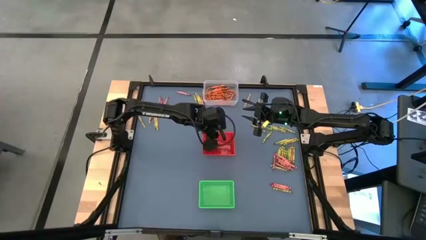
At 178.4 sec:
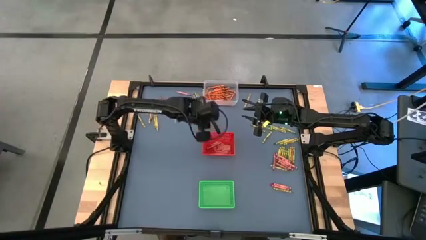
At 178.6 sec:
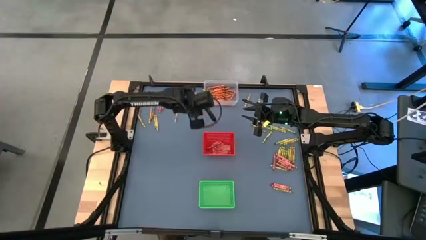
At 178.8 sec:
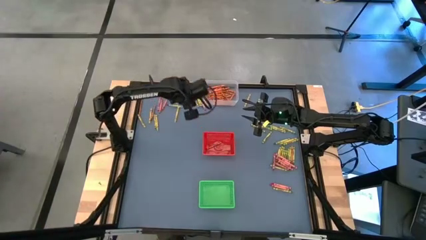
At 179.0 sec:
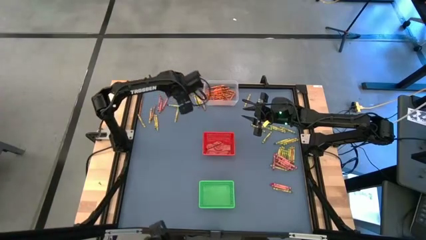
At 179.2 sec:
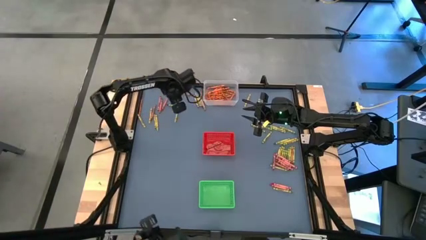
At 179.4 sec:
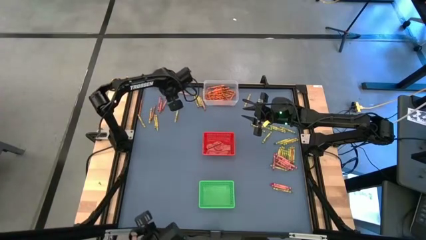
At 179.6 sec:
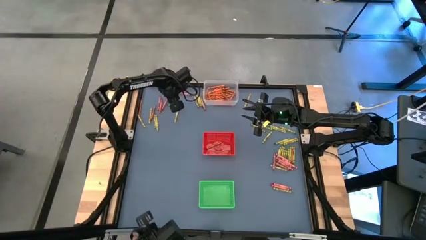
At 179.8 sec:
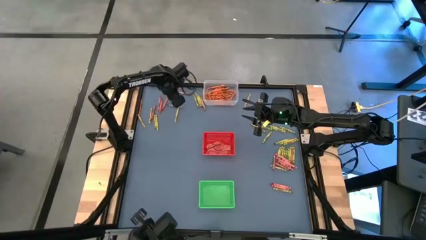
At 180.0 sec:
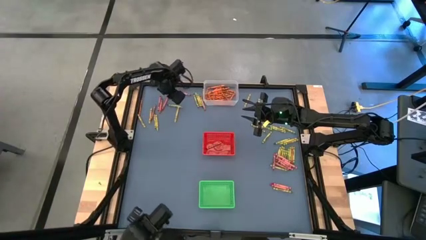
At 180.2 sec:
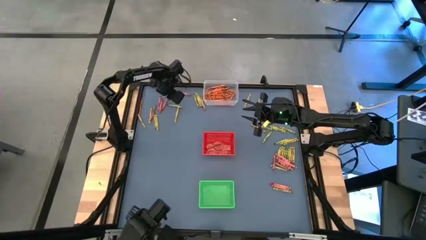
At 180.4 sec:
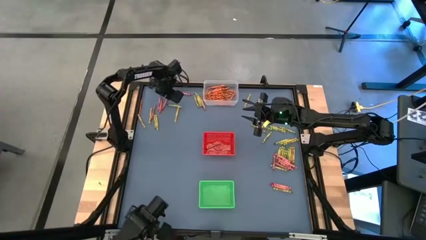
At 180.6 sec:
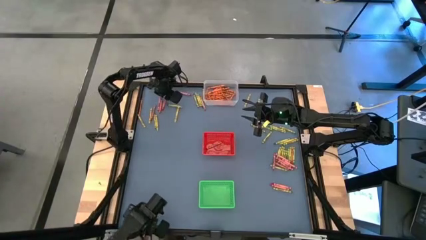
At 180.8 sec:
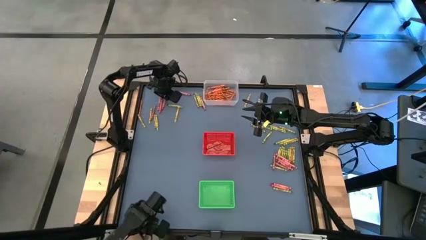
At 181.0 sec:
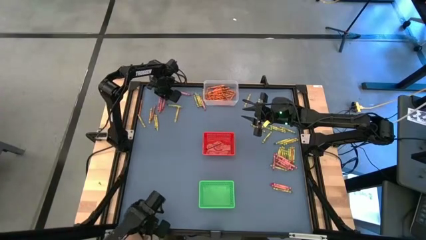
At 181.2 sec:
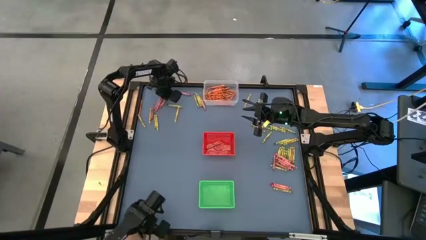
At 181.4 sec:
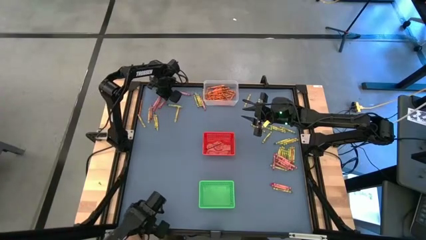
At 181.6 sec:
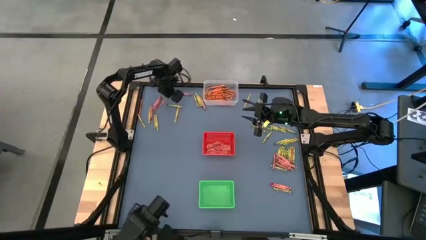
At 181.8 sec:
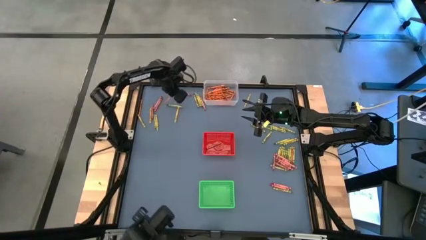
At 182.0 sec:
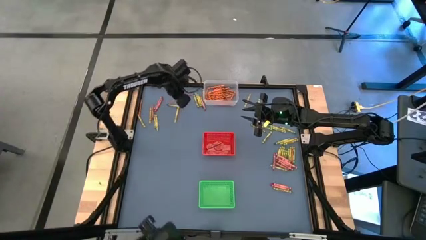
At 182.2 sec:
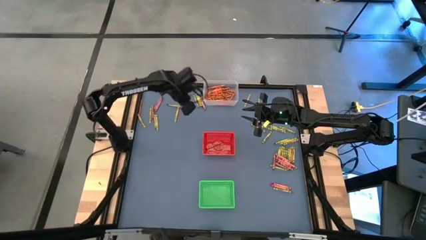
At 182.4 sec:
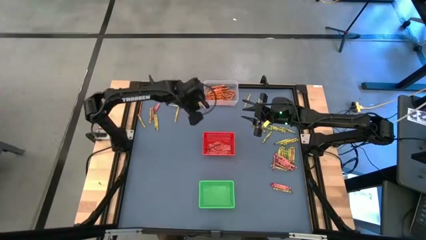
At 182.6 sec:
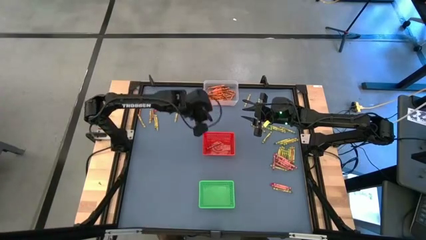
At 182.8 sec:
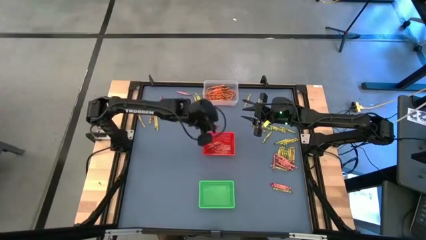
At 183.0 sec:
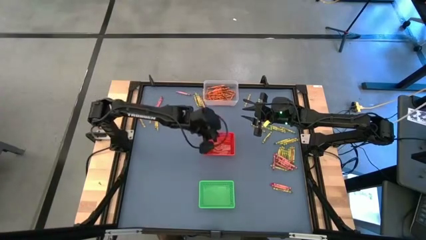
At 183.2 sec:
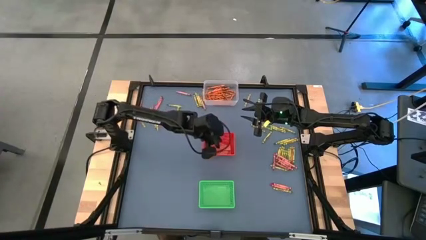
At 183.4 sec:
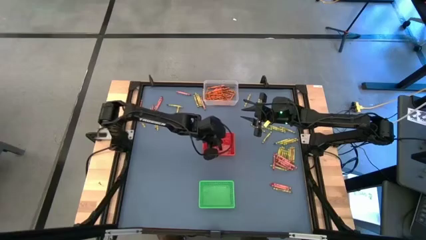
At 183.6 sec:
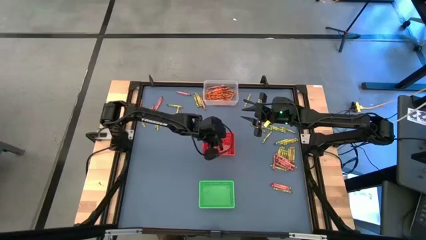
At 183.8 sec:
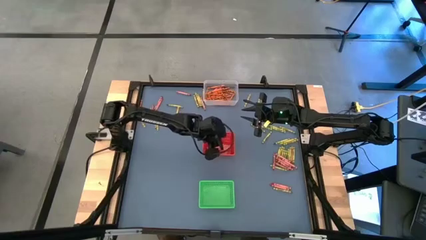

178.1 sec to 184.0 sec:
Task: Sort crayons
Put the red crayon into the red bin

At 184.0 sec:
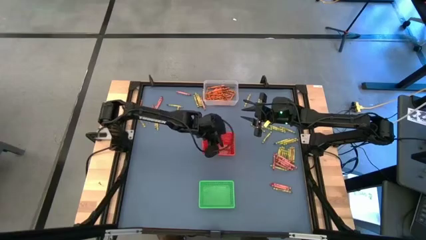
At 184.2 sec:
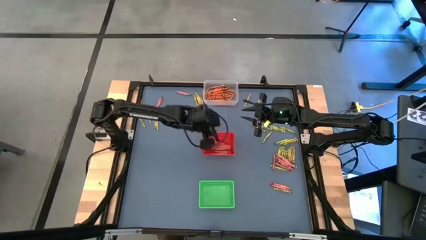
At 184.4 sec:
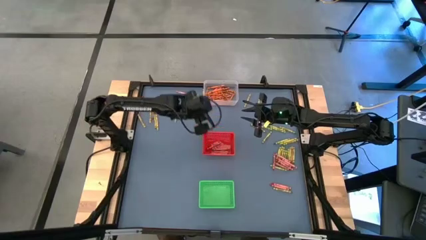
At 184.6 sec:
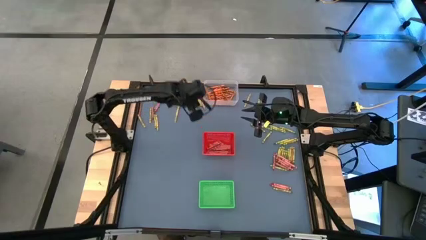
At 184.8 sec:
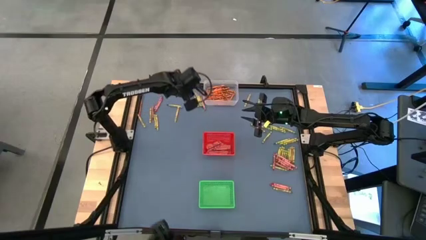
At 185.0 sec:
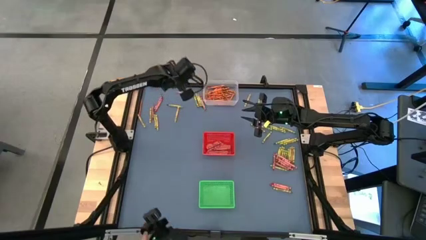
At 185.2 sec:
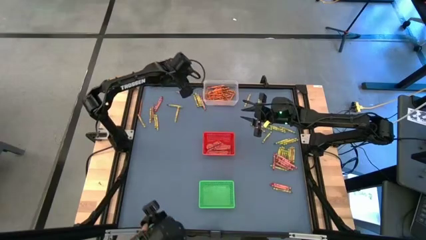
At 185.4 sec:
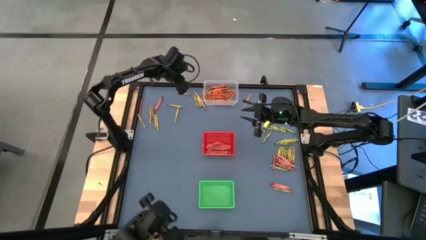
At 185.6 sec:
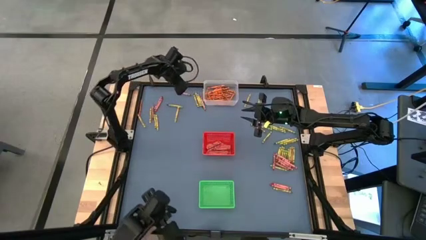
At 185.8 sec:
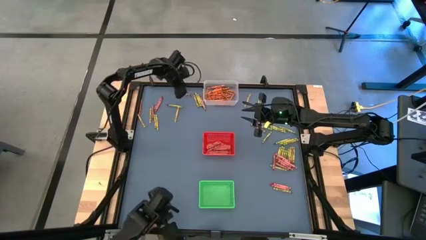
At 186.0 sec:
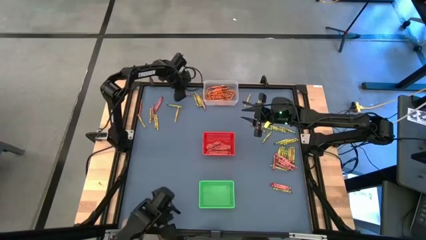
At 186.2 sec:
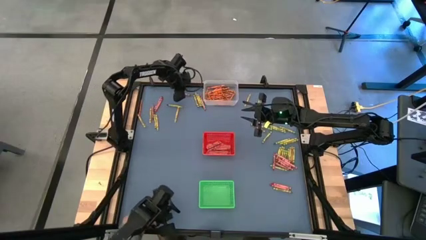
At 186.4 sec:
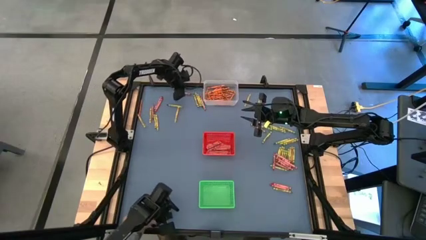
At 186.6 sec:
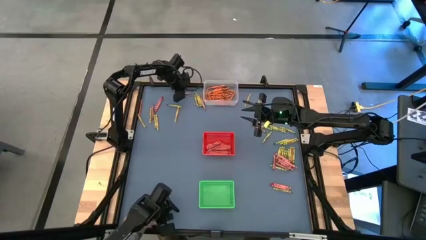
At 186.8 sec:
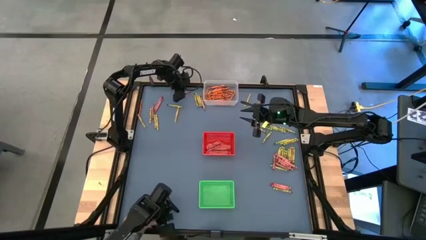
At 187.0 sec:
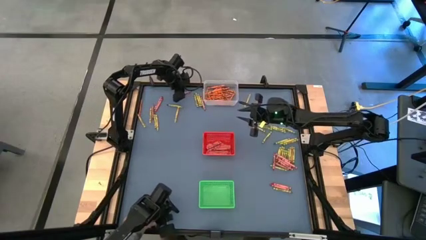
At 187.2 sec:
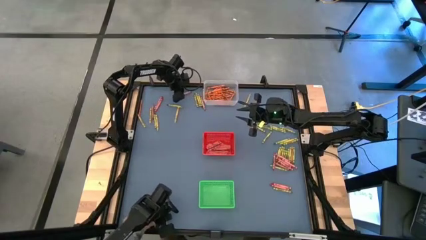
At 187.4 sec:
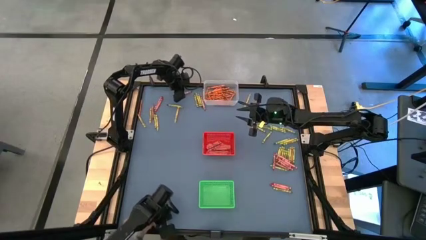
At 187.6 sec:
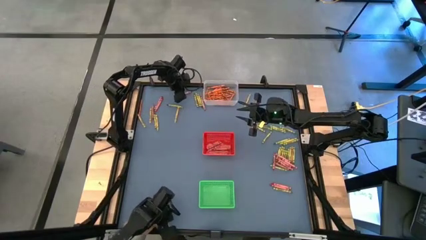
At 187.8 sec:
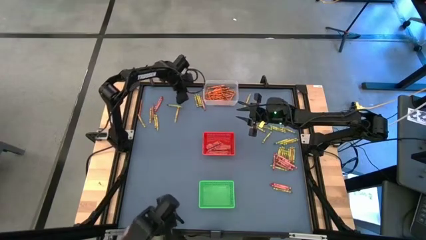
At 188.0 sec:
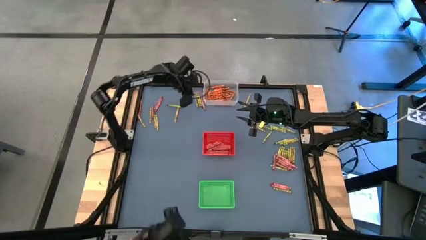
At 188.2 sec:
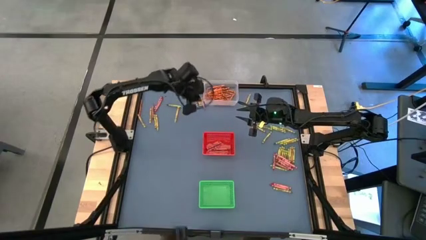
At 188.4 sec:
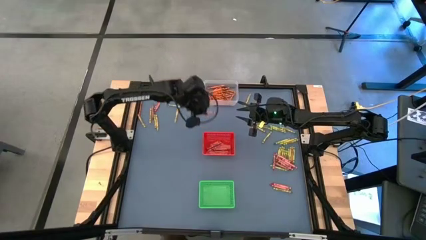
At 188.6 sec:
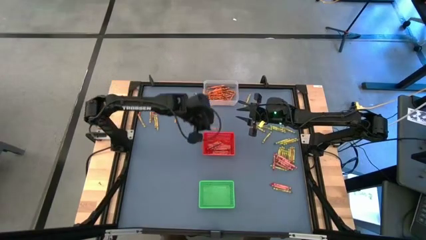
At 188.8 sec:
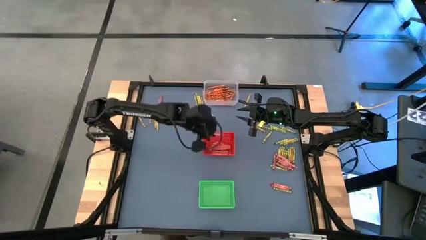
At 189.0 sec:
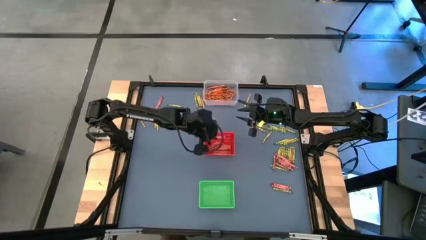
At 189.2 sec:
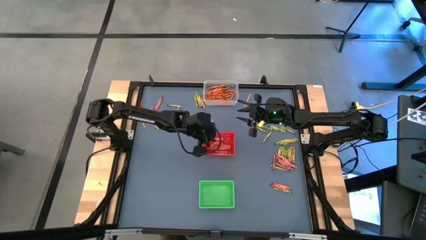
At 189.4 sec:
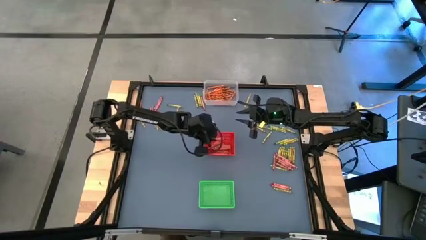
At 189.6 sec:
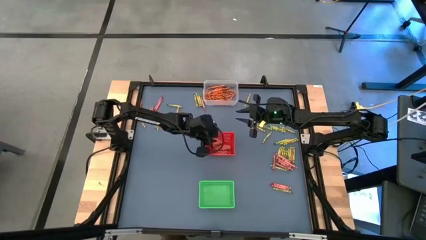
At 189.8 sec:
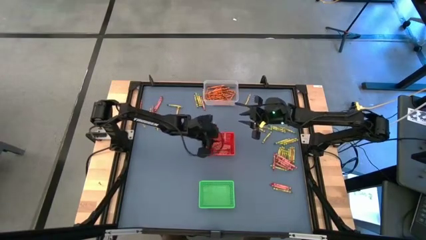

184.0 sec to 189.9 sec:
Put the red crayon into the red bin

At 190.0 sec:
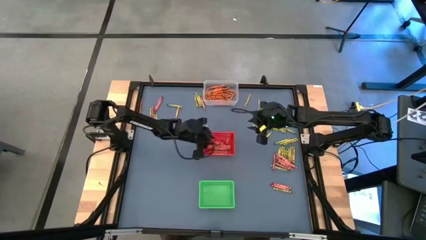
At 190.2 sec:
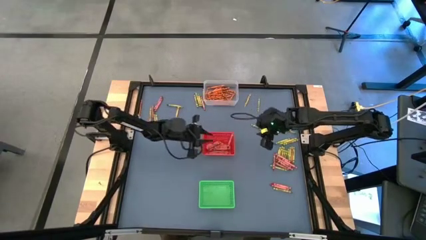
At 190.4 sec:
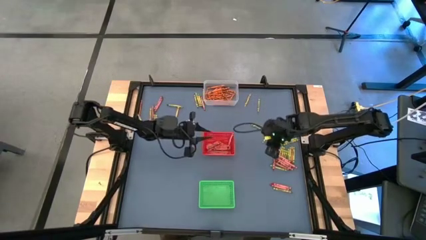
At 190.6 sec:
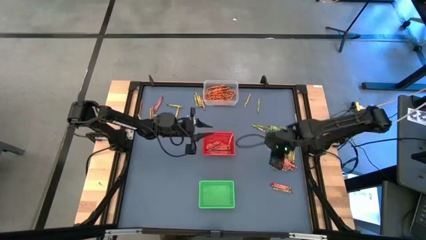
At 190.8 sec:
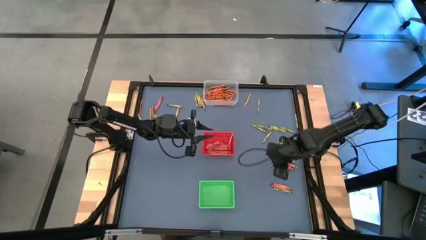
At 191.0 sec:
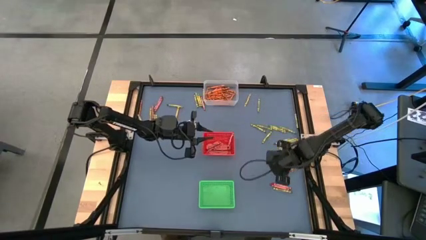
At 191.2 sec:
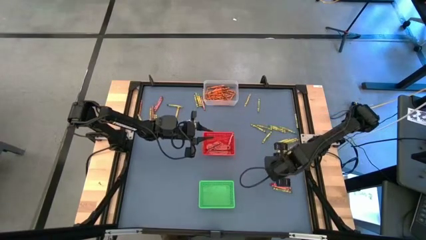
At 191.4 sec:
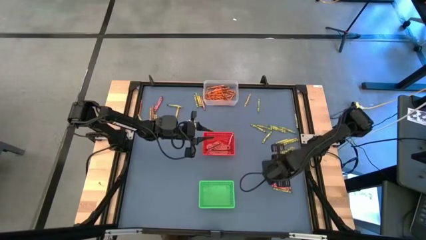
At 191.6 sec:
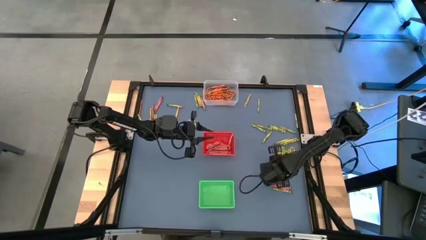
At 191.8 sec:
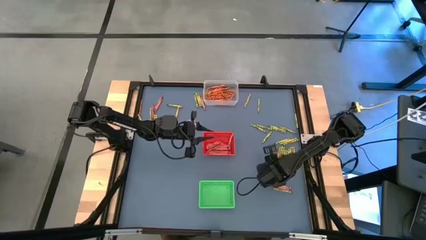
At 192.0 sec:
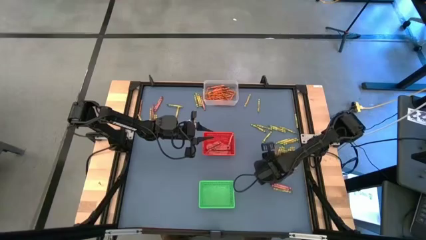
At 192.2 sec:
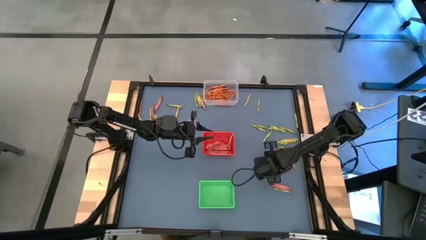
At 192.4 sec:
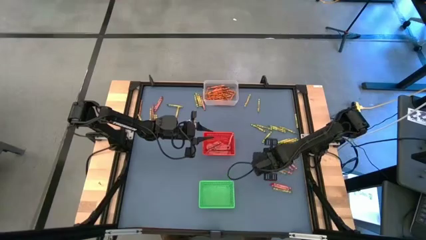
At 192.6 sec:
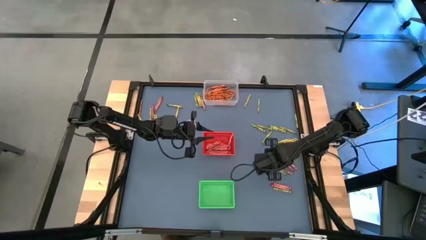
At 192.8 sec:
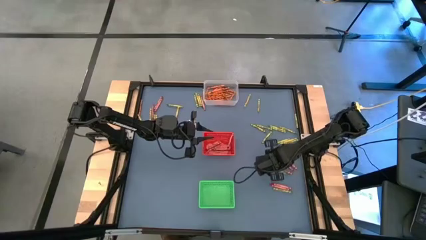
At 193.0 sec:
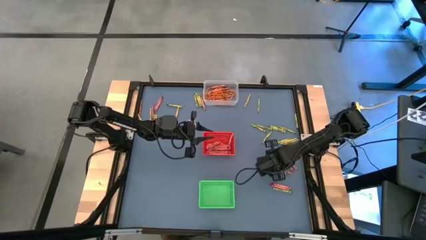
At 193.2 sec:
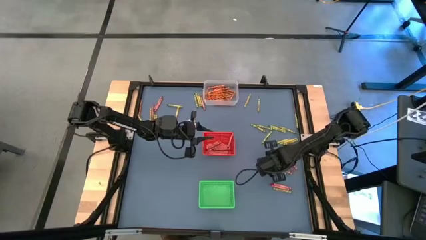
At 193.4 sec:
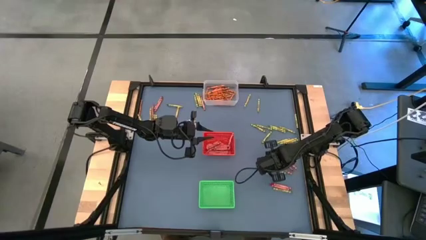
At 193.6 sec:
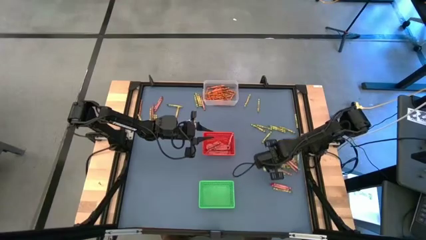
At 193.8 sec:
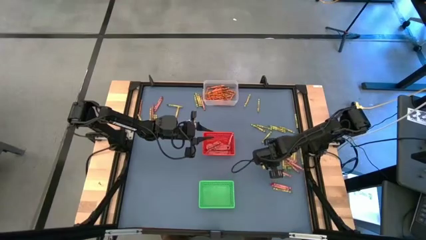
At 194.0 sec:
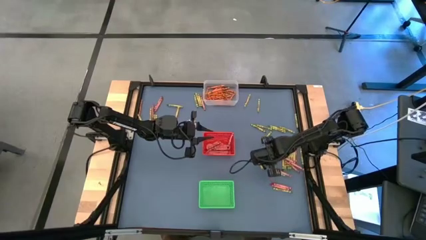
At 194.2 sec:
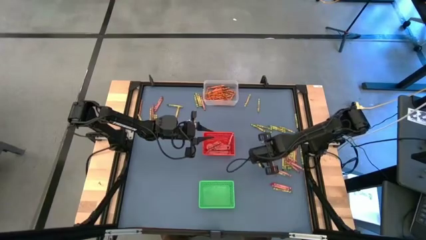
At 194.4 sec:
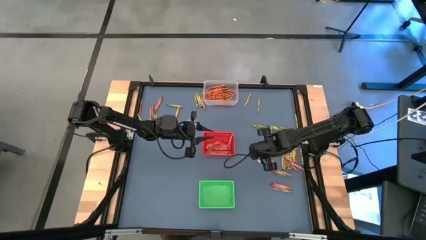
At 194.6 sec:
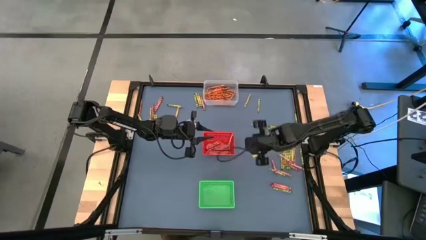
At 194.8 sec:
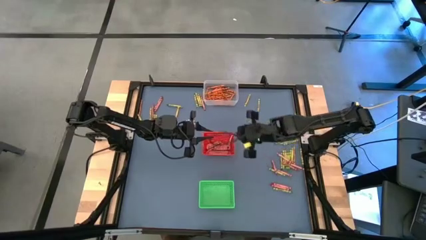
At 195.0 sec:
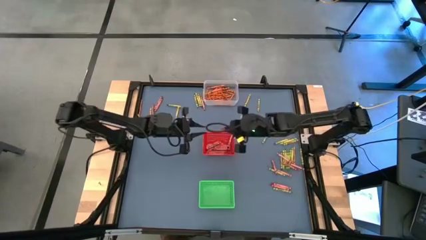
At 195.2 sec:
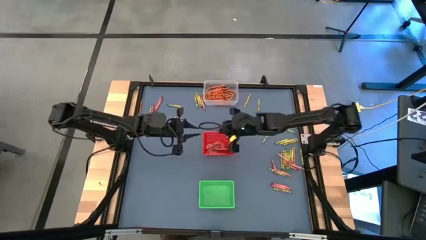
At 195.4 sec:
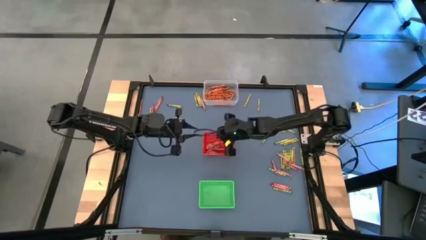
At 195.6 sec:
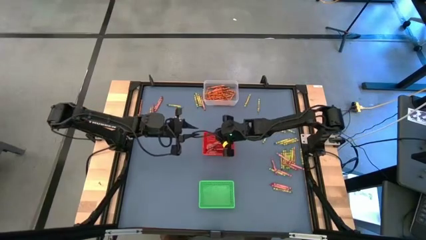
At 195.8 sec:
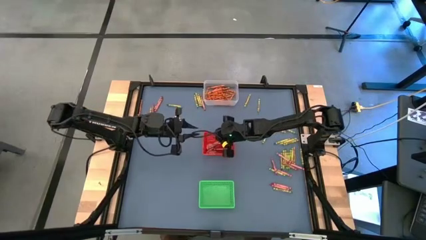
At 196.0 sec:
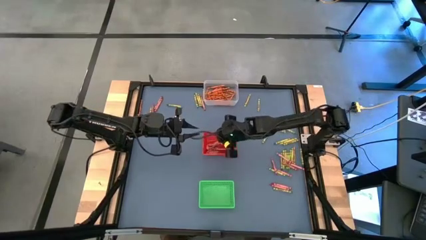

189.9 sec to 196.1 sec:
Put the red crayon into the red bin
